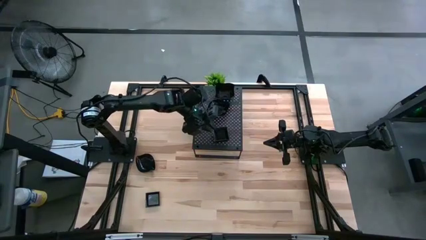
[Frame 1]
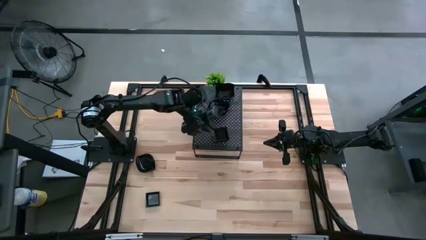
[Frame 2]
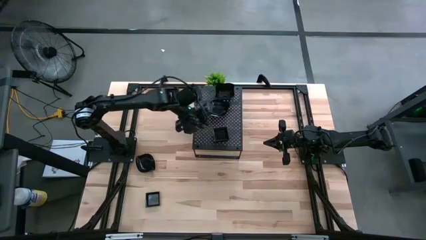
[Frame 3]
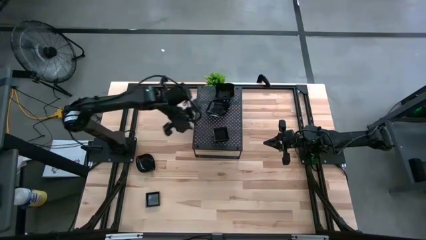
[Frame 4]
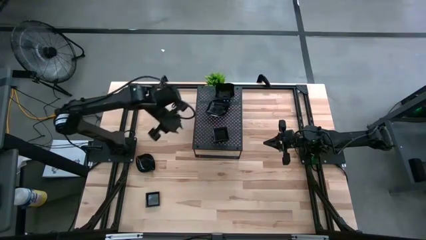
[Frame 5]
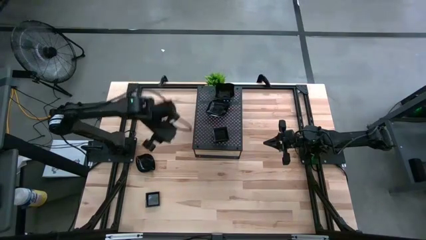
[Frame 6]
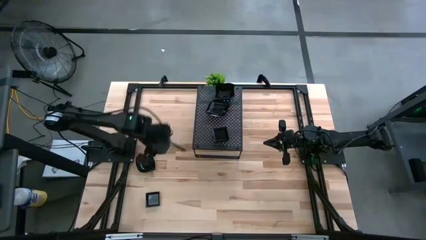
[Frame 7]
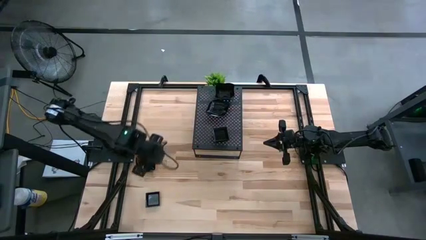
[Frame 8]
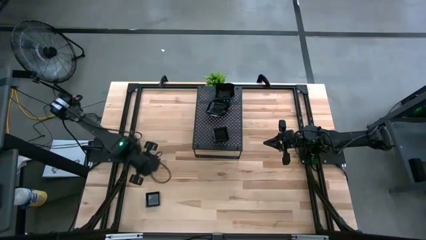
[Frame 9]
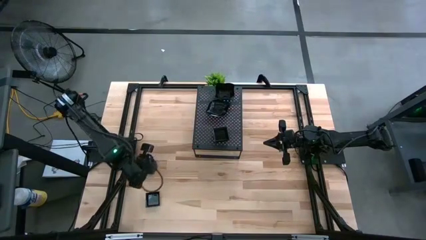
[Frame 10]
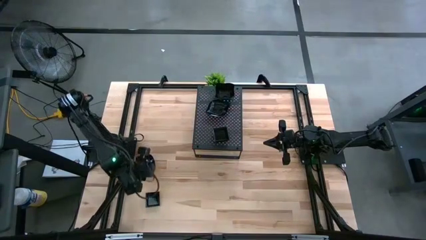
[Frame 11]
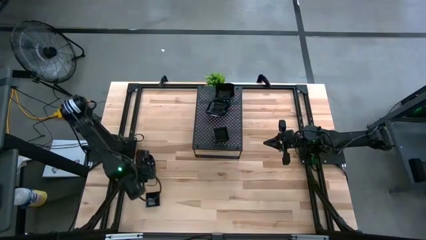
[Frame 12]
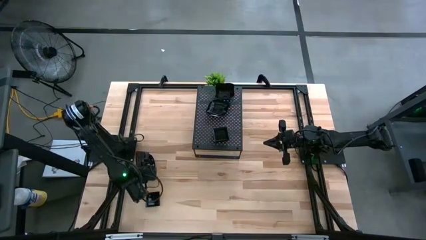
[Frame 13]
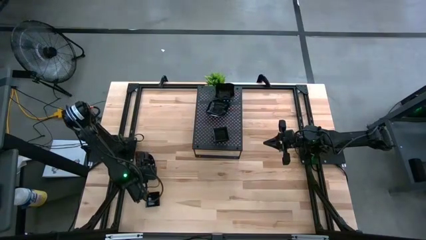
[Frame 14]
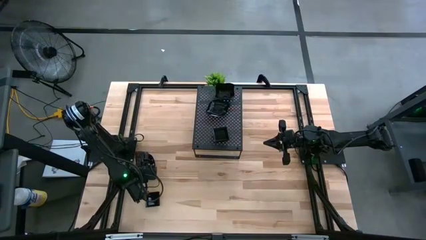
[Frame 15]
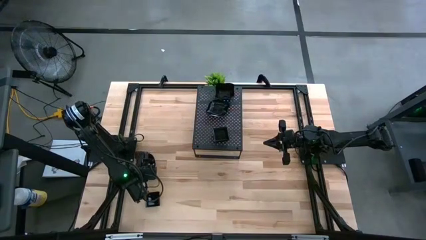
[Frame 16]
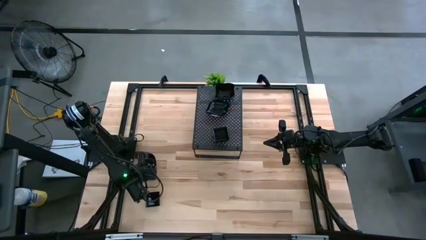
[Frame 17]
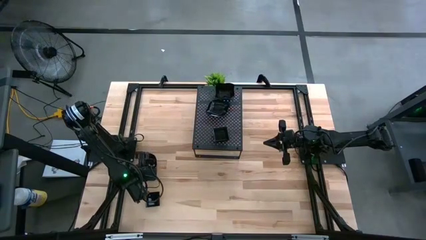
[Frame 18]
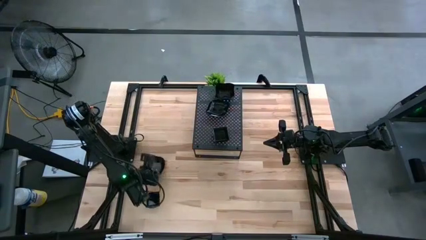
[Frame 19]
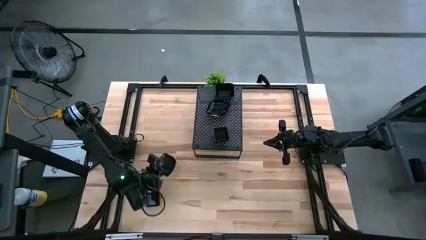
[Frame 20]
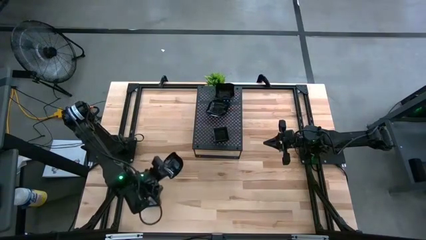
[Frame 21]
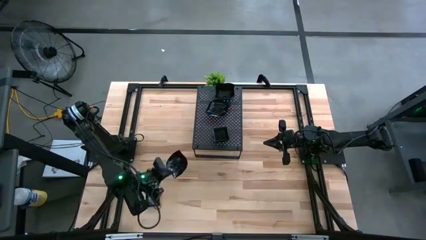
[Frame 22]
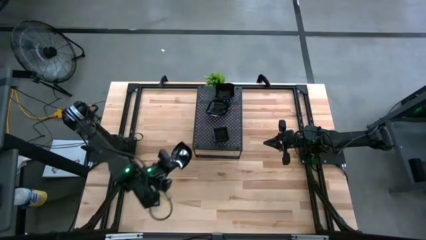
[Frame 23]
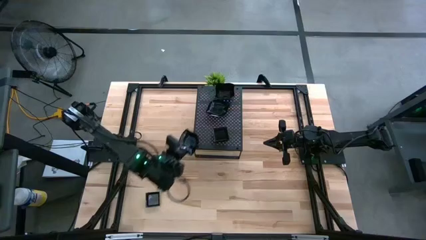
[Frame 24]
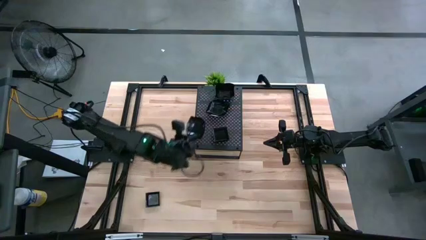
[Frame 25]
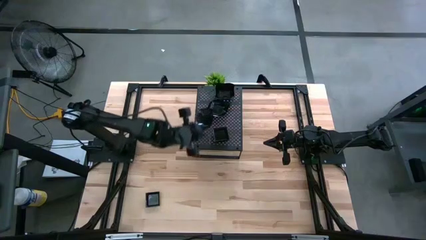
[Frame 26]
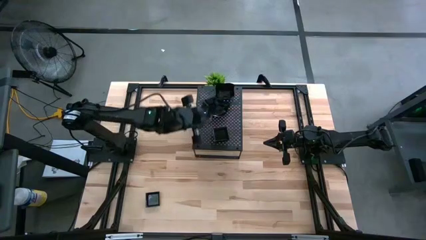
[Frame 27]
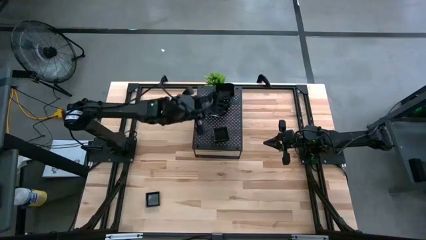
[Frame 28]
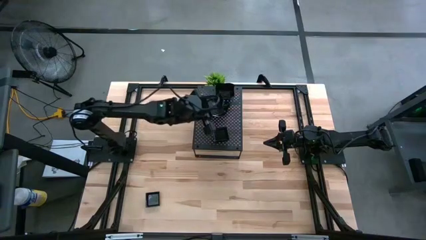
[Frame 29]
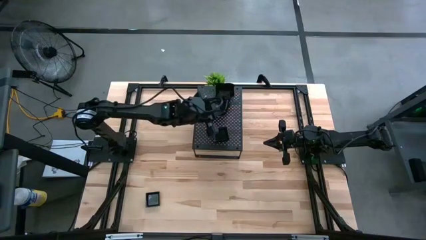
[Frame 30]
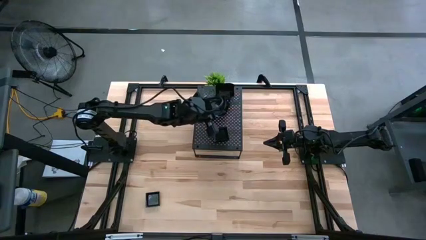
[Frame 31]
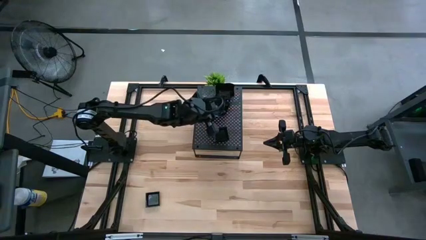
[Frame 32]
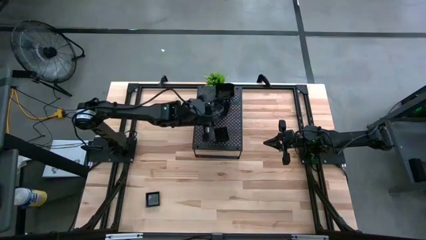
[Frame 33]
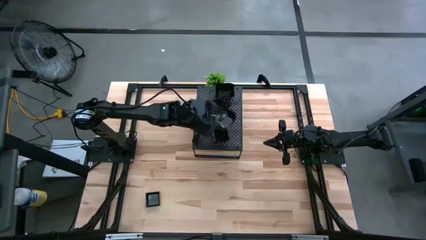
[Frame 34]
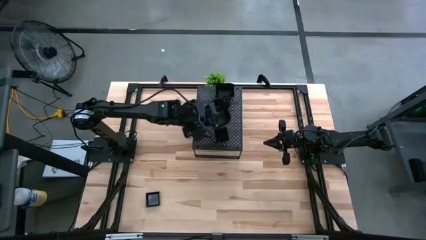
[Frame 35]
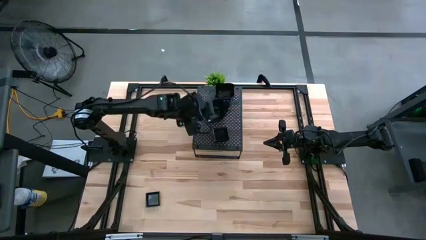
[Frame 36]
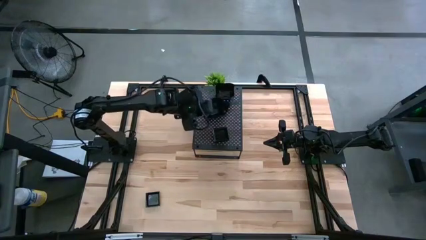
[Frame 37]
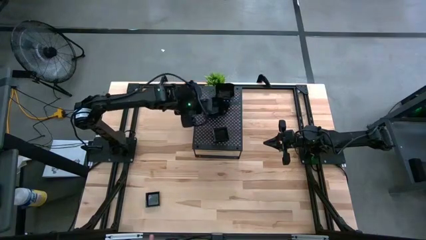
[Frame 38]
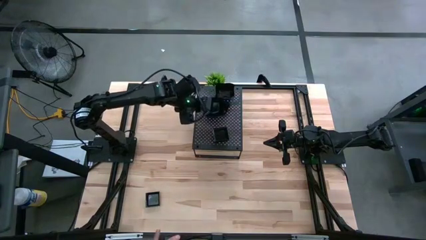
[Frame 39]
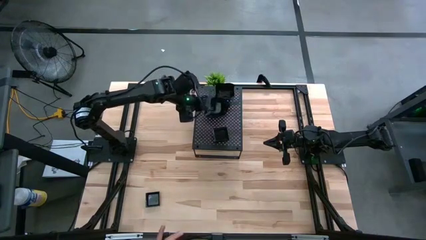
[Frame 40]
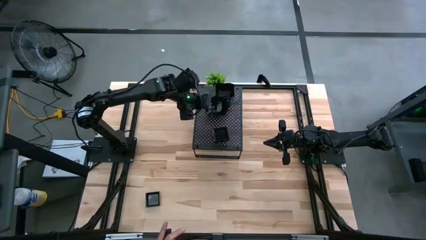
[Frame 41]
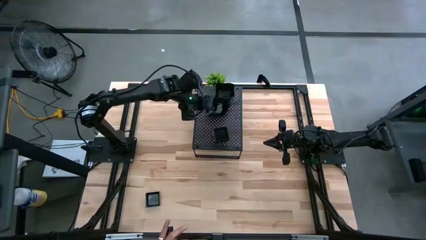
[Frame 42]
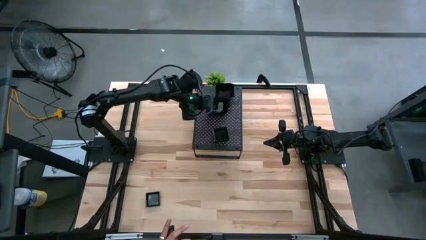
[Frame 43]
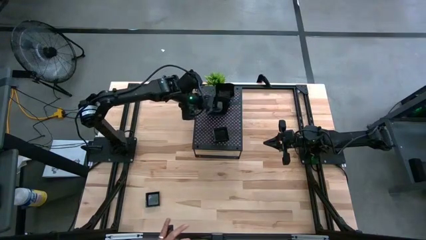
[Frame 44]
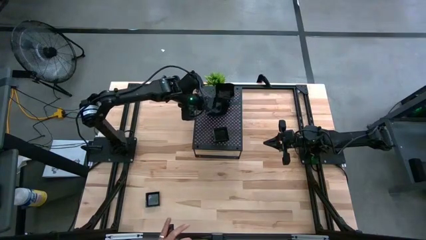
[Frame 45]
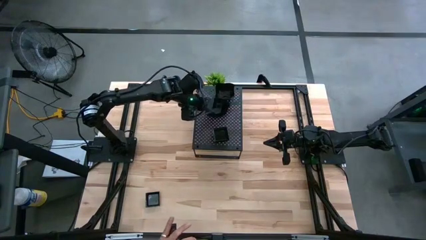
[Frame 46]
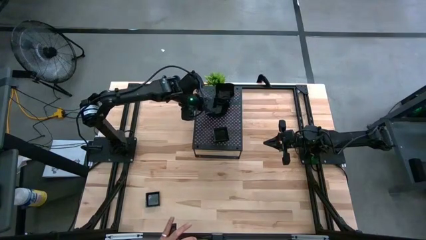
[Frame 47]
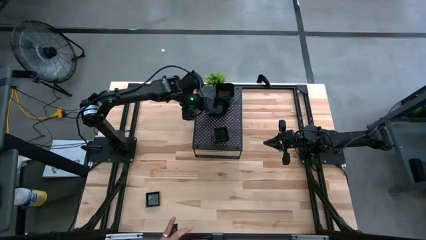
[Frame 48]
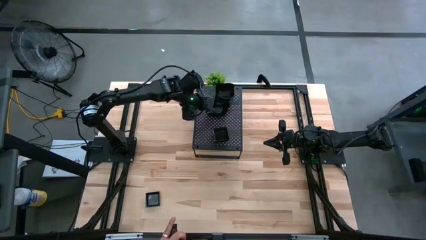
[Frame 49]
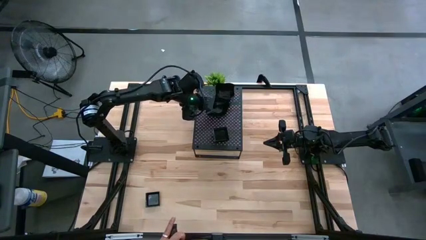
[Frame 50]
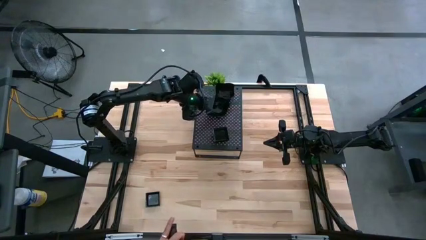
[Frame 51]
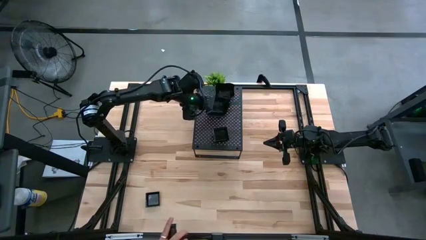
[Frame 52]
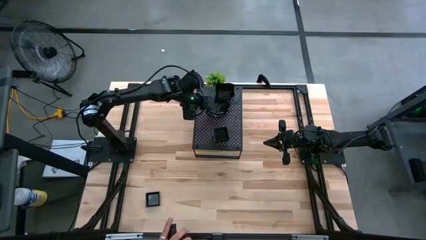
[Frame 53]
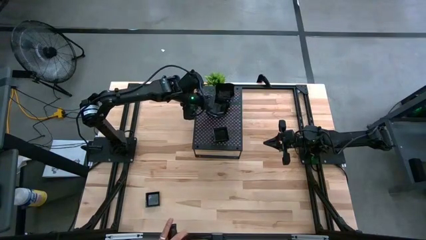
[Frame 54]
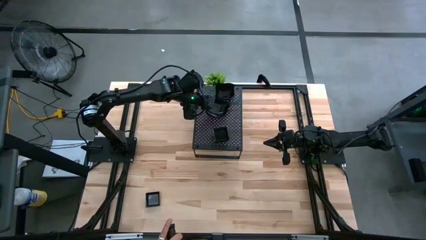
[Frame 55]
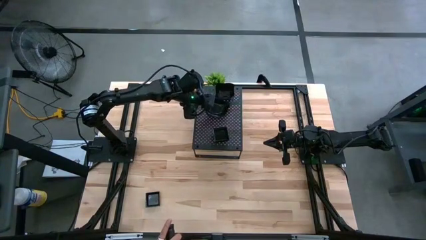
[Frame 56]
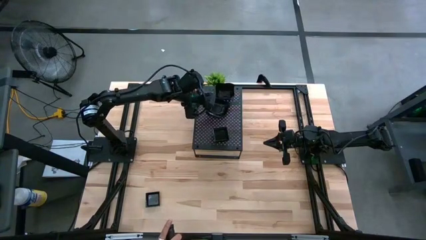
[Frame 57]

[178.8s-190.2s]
Task: Pick & Place Mini shaped plates
Stack the leaf shaped plate on top of the leaf shaped plate on the shelf

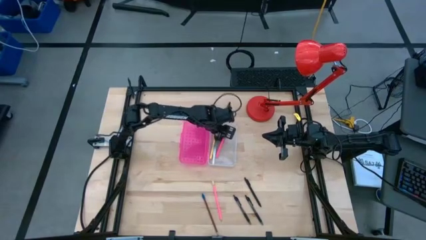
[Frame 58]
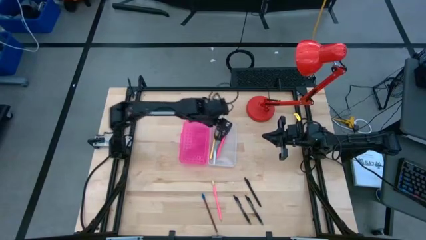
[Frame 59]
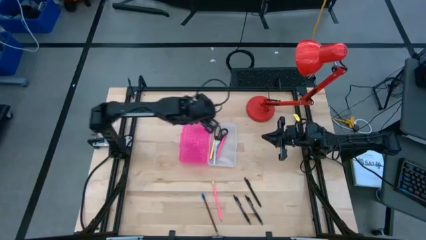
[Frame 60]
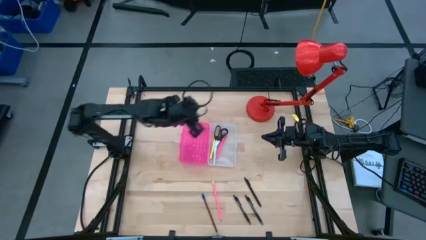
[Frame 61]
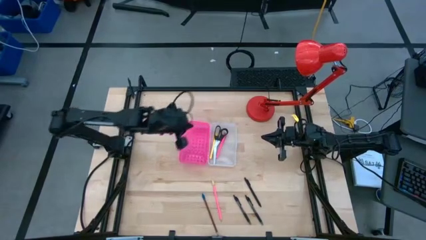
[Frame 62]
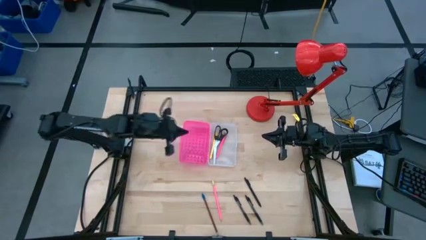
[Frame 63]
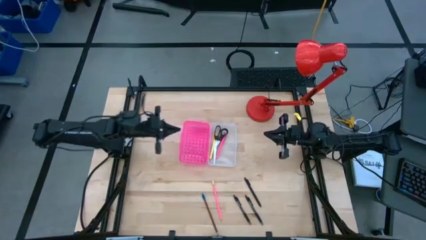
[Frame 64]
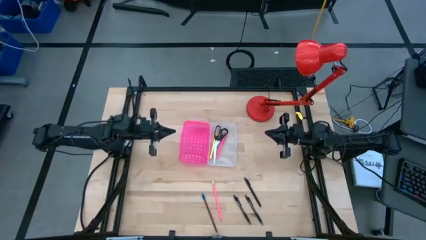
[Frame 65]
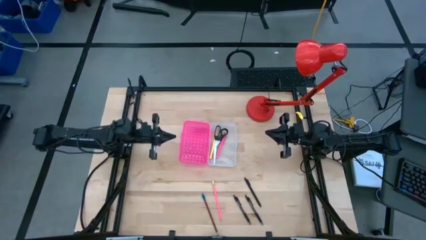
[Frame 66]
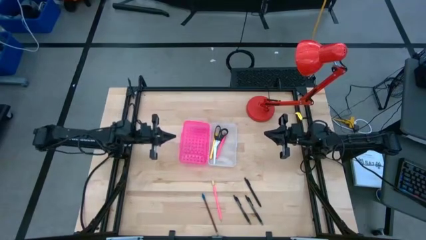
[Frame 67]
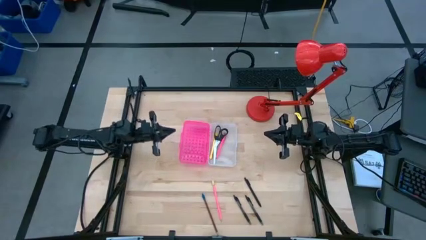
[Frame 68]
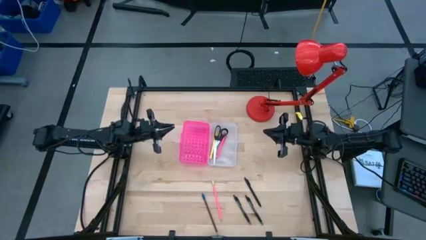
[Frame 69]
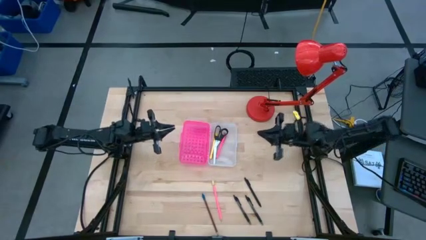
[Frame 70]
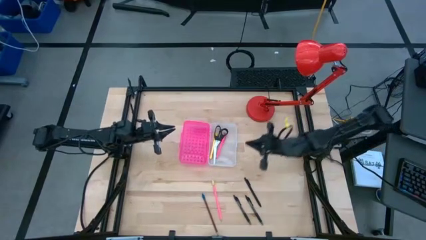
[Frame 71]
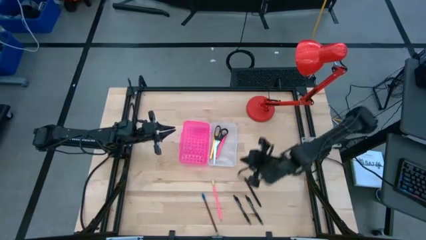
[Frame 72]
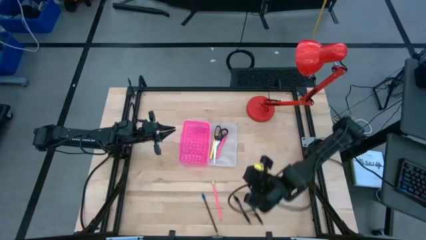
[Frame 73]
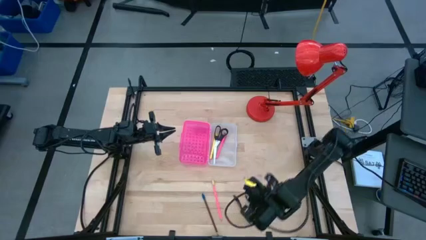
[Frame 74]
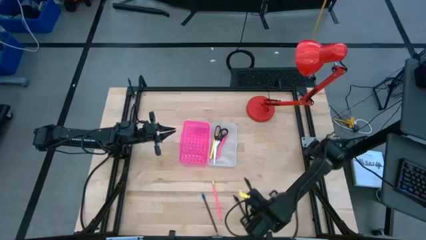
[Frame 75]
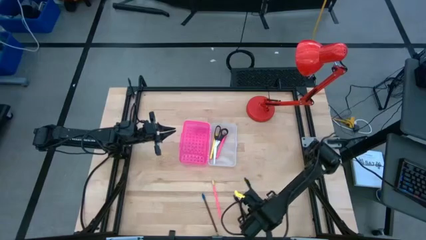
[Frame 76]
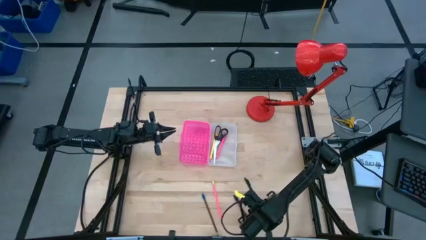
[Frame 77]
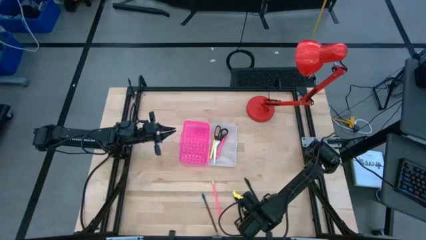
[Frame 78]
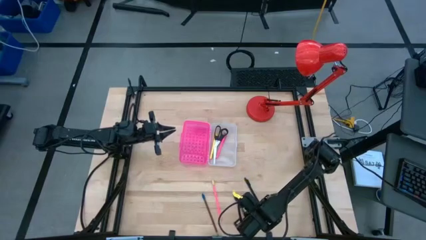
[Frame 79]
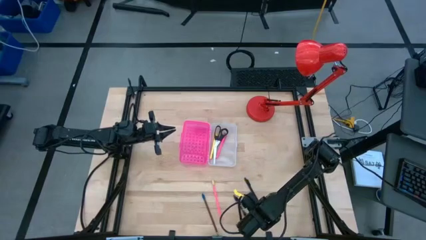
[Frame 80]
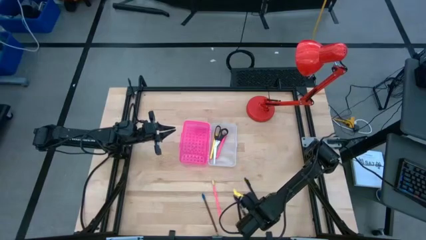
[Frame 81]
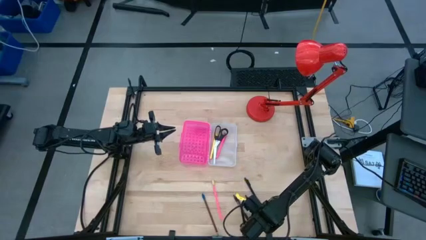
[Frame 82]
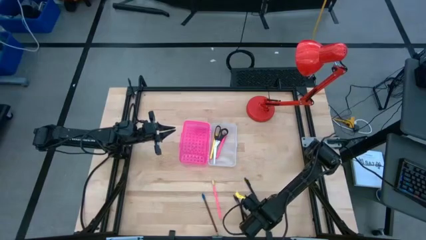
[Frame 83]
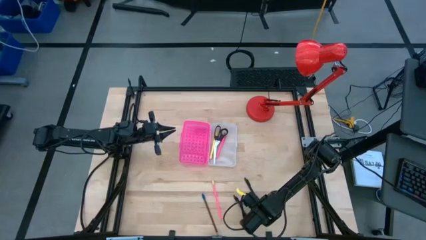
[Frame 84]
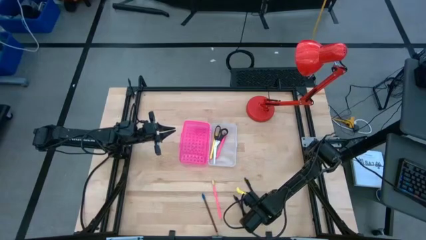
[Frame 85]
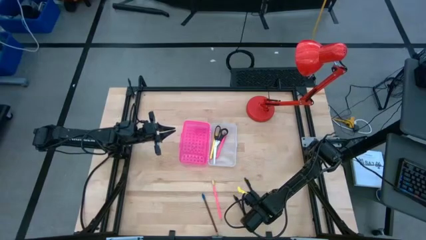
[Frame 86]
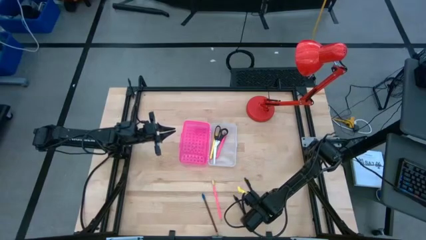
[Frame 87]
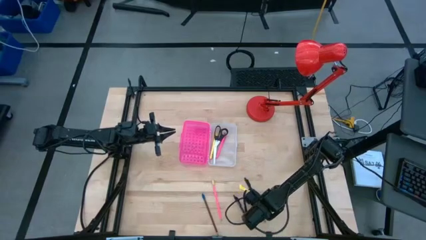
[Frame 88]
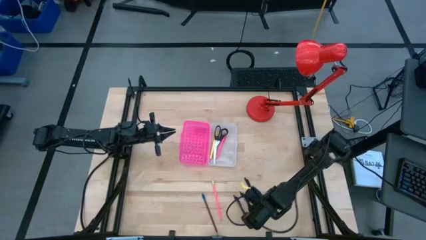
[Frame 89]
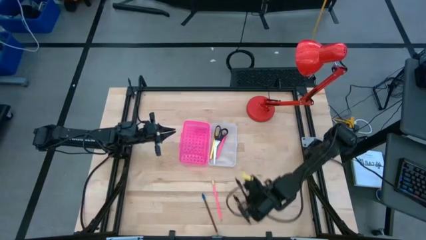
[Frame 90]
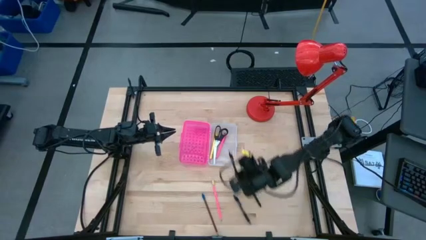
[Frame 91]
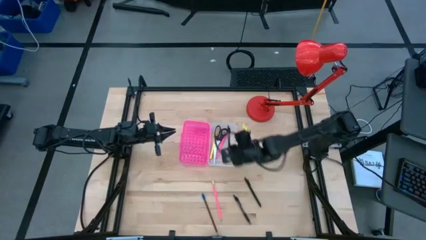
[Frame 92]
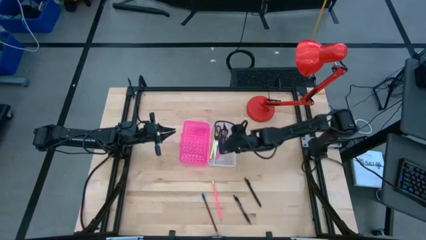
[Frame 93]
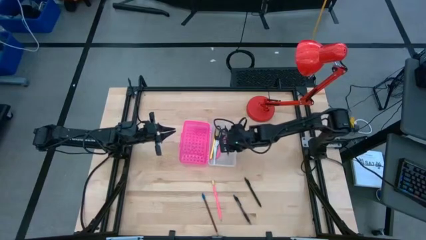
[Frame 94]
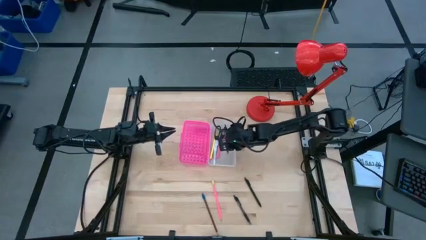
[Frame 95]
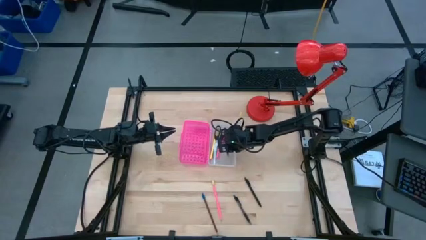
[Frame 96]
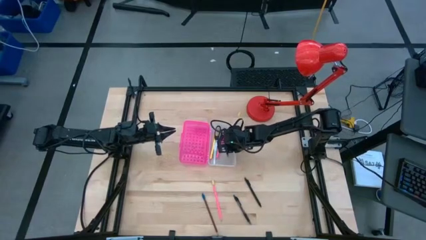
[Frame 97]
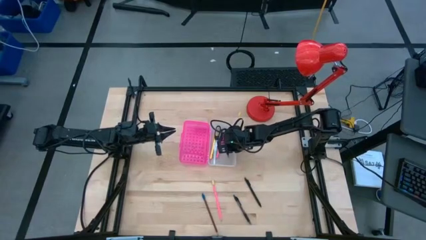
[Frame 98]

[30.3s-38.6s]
Task: Pick & place school supplies into a supply box
Put the right black transparent pen into the supply box
